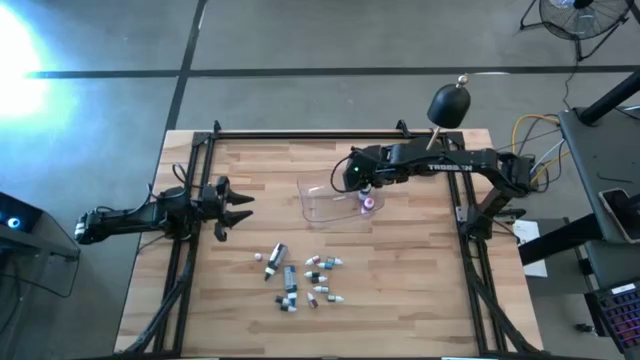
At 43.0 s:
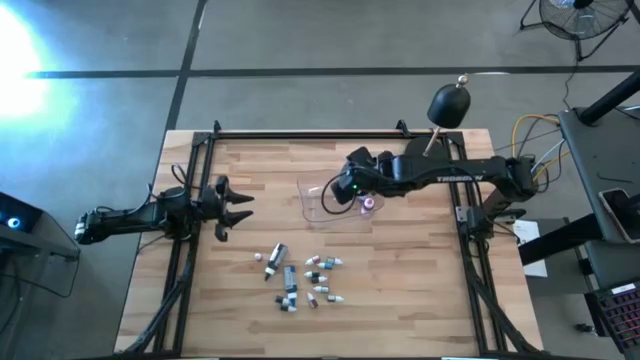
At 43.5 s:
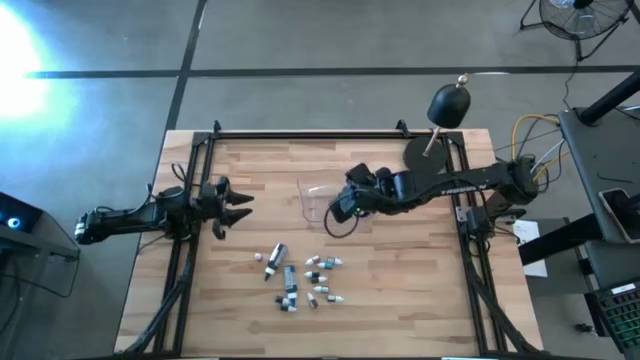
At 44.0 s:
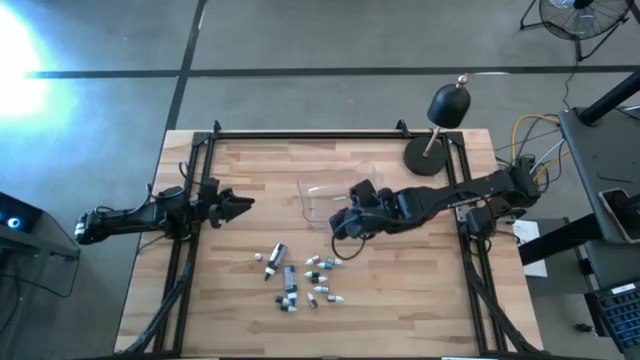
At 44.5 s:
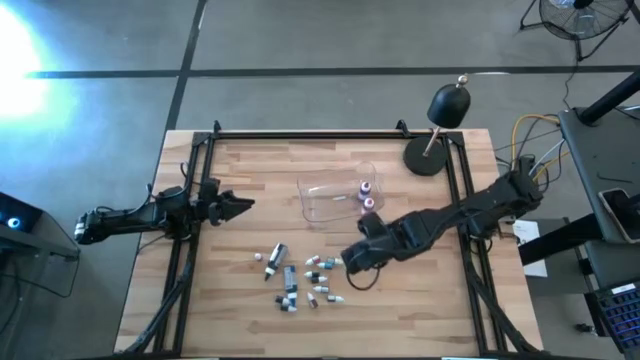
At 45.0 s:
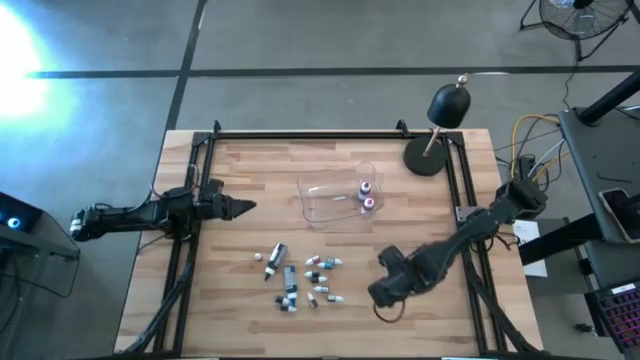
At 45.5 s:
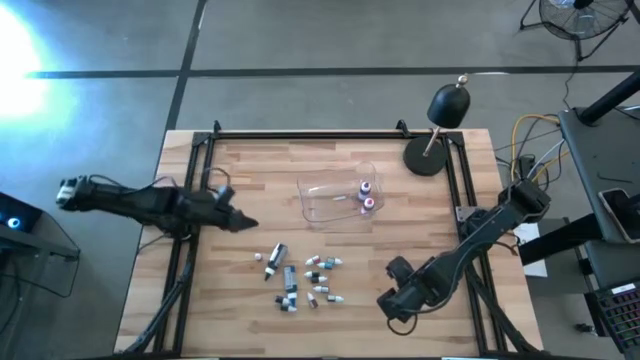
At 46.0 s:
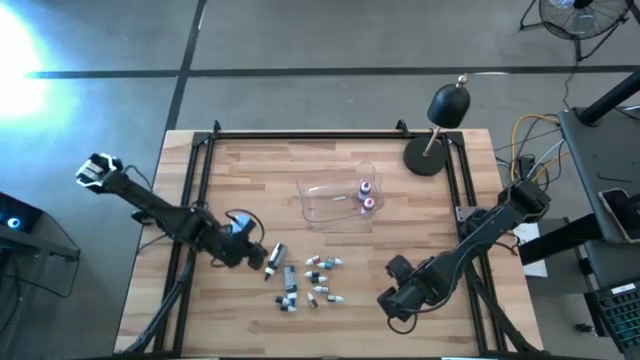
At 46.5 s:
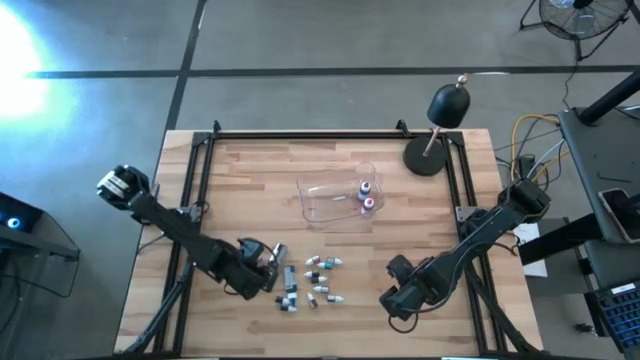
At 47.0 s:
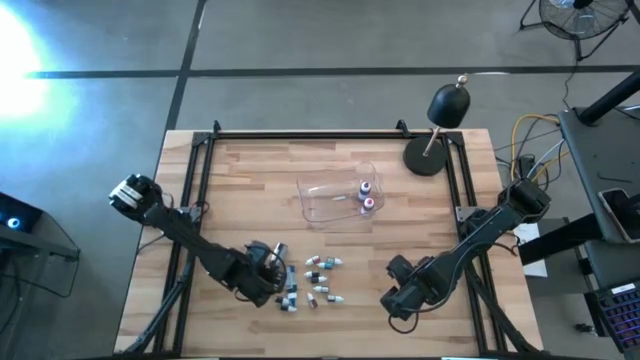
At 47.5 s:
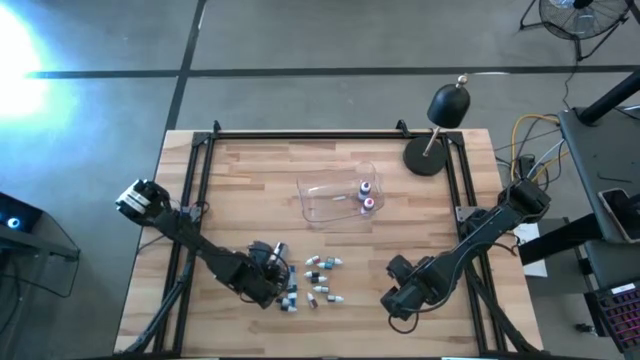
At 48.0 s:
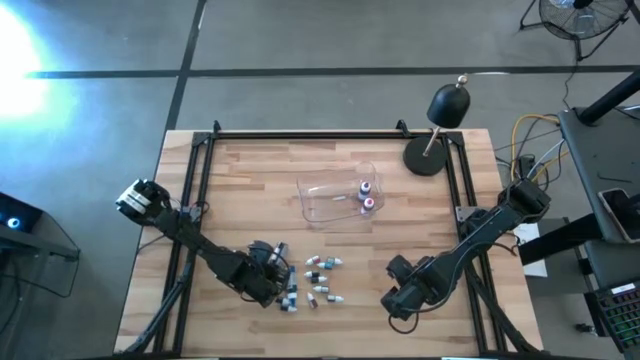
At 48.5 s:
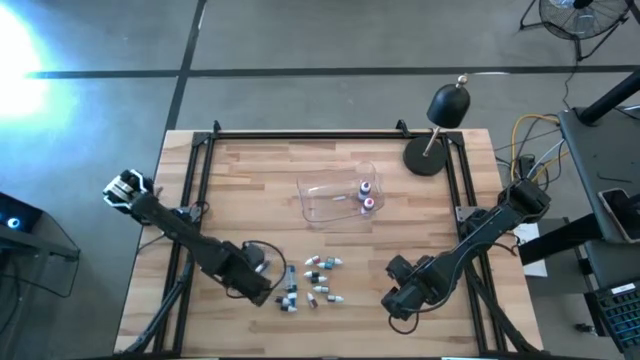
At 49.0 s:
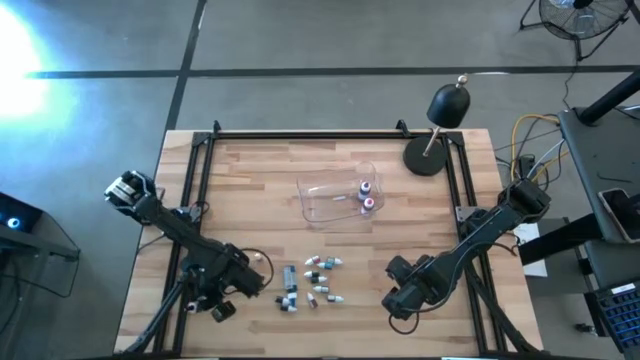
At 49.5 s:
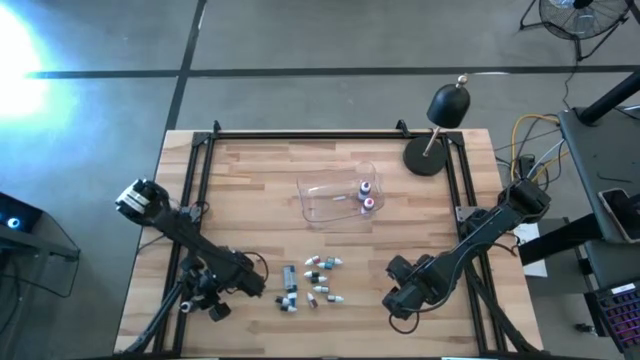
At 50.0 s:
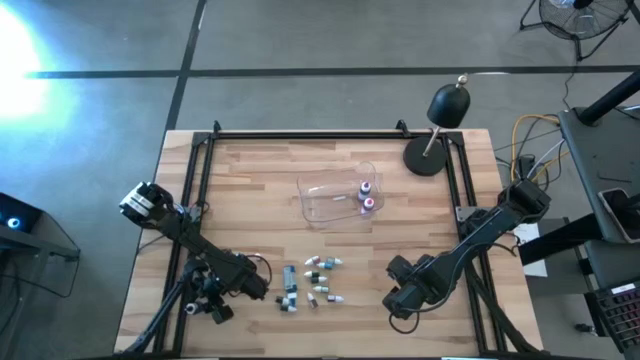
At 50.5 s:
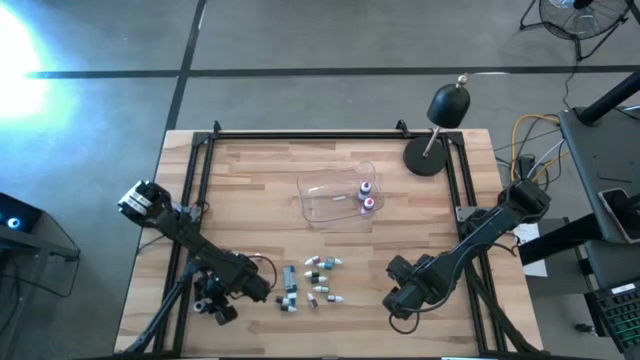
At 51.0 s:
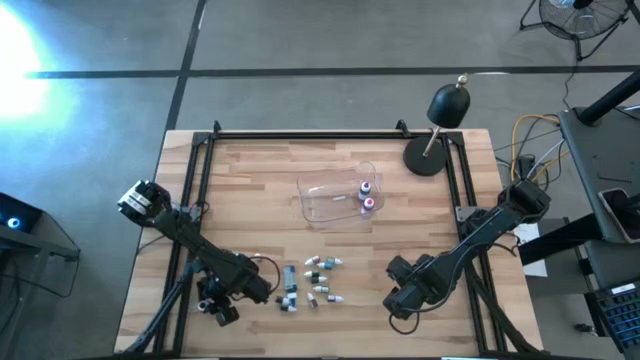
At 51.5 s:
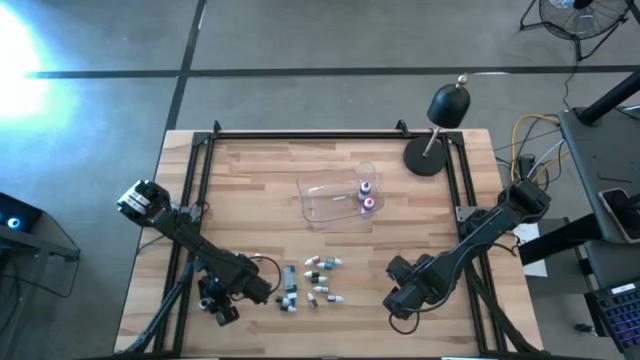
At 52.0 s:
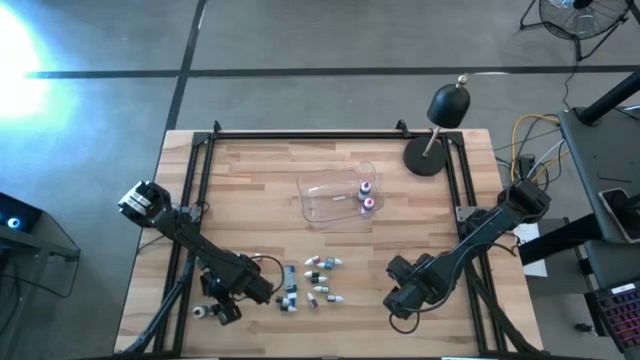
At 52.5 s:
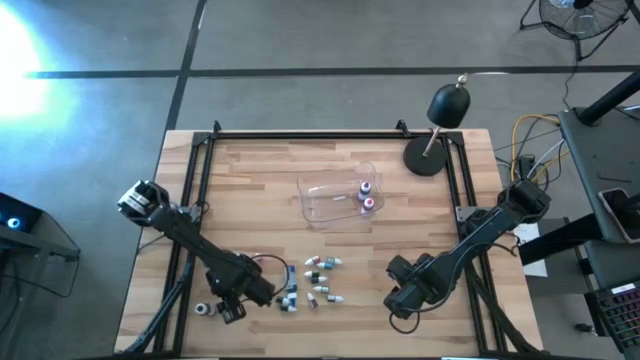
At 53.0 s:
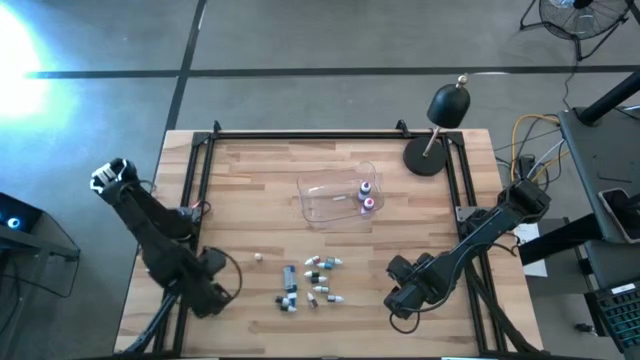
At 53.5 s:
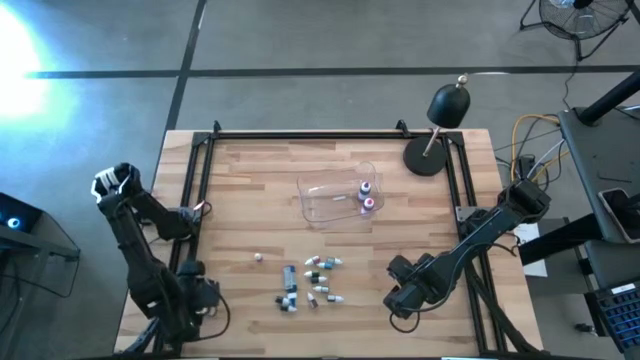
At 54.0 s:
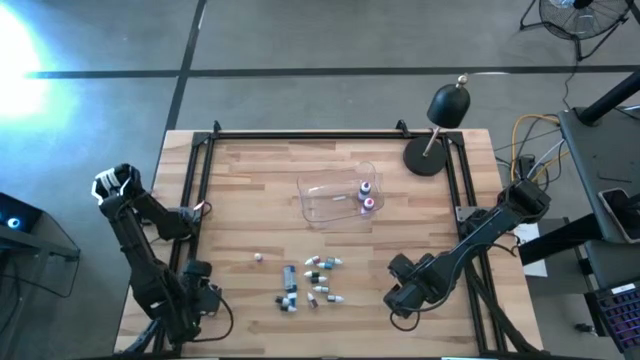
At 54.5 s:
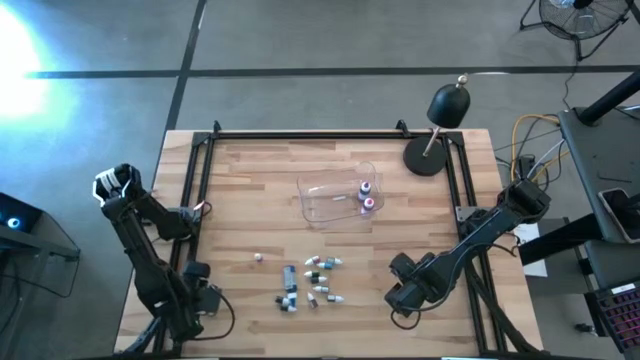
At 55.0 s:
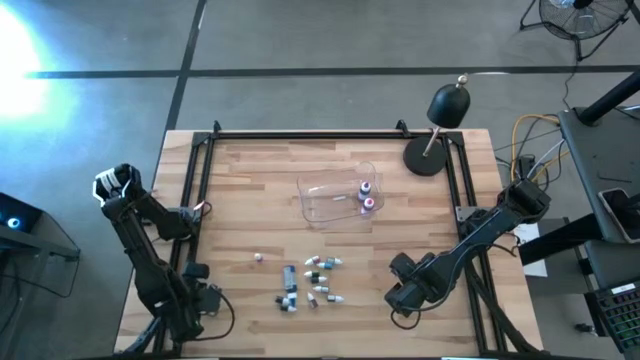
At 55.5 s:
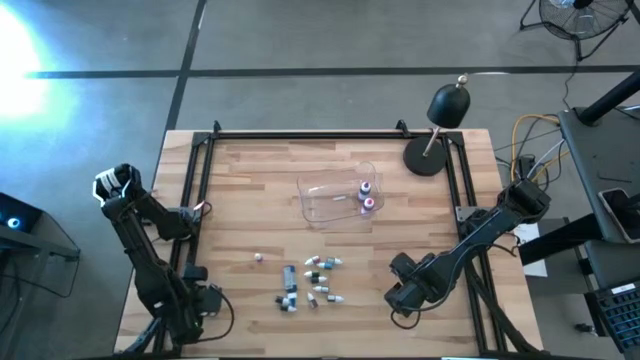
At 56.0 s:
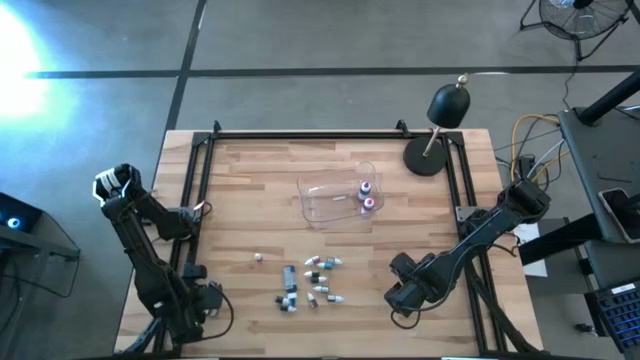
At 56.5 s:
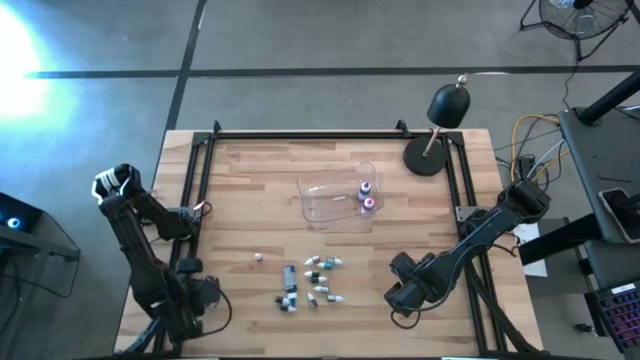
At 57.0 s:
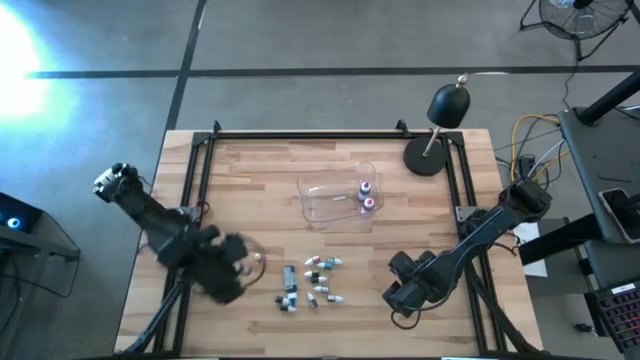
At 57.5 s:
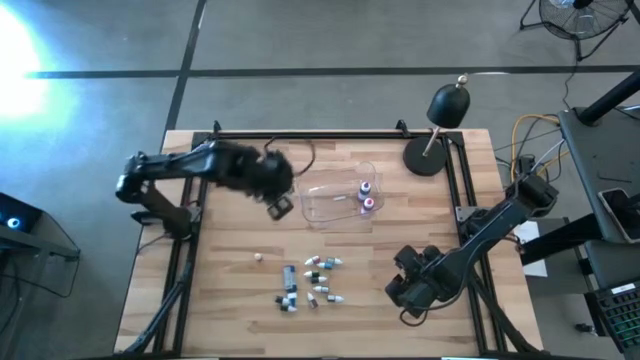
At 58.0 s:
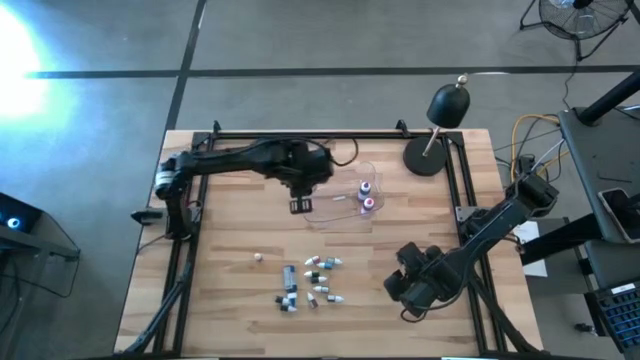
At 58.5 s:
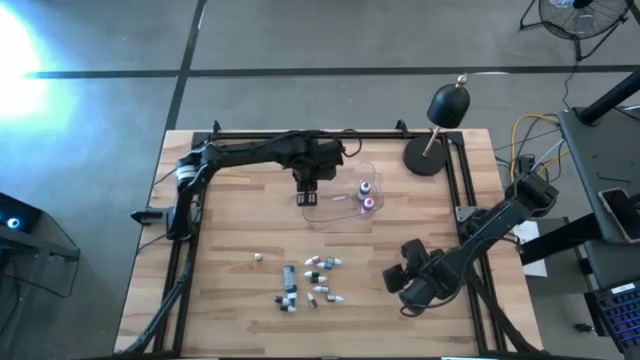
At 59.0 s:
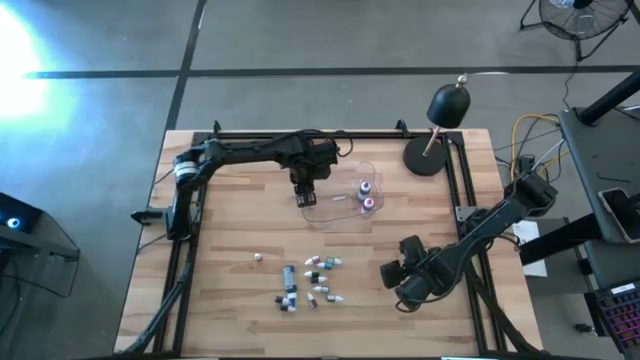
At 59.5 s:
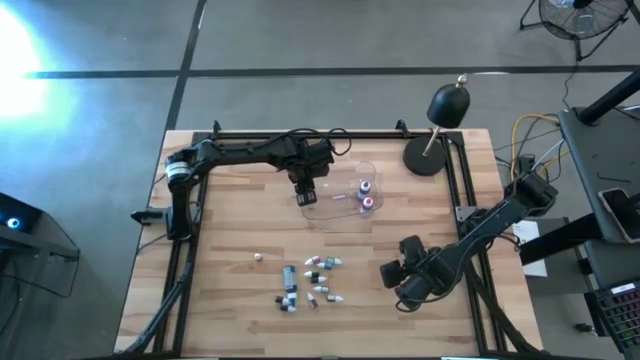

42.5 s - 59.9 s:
Task: Pick & Place food coloring
Put the large black food coloring bottle into the transparent bin

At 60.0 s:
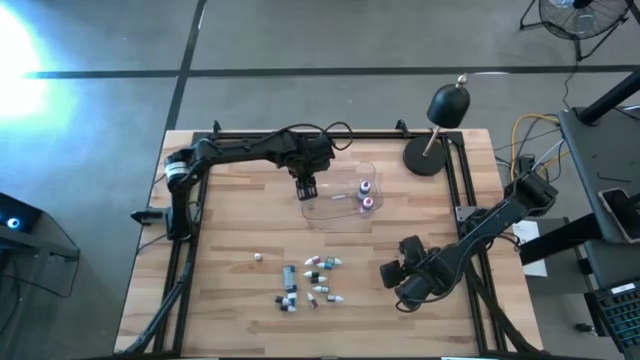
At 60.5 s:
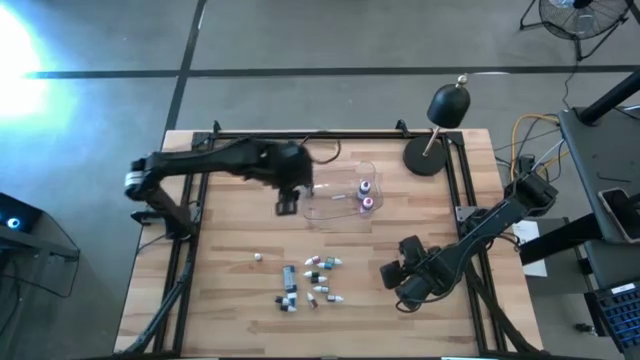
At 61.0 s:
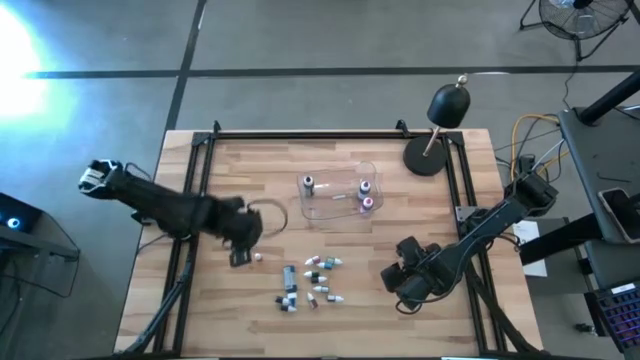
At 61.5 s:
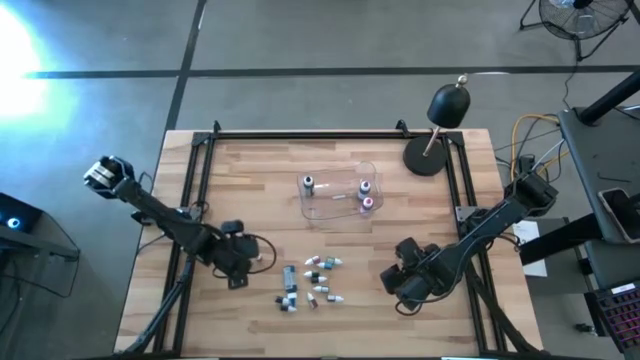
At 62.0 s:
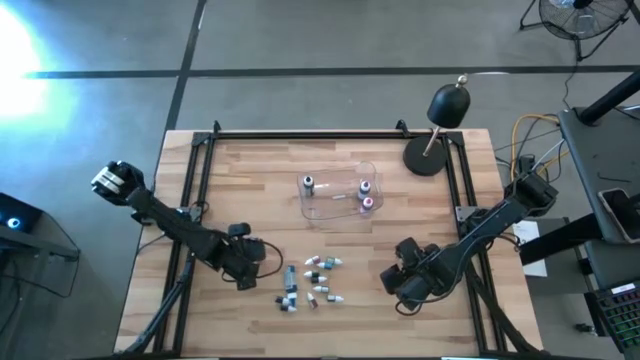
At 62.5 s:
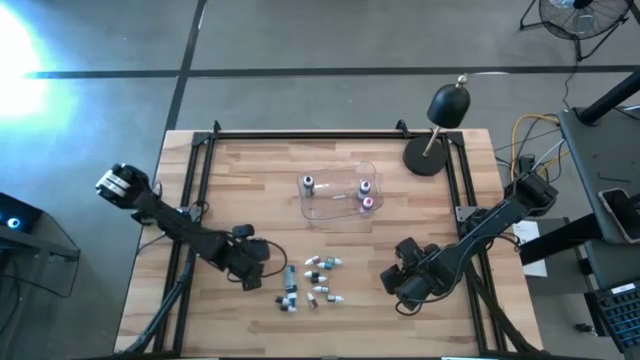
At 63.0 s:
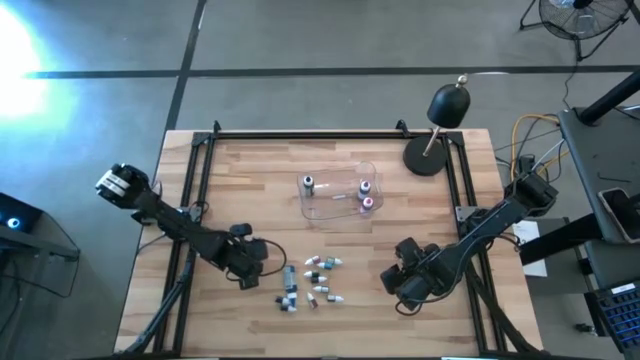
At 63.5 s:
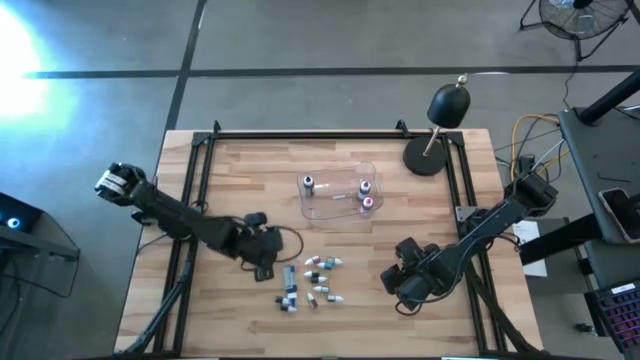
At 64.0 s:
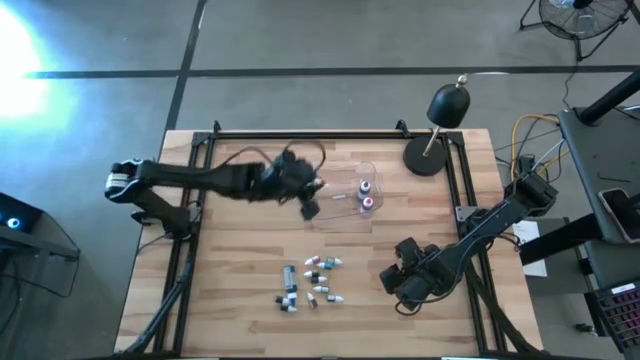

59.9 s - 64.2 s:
Put the left small orange food coloring bottle into the transparent bin
